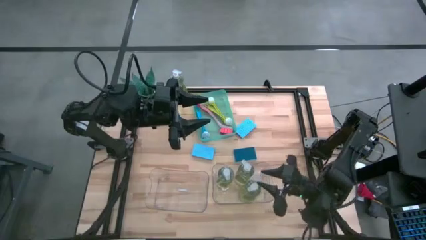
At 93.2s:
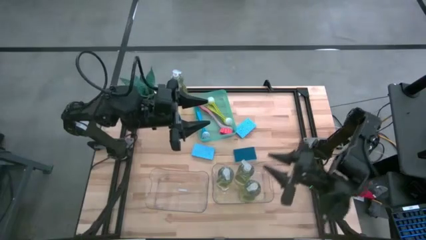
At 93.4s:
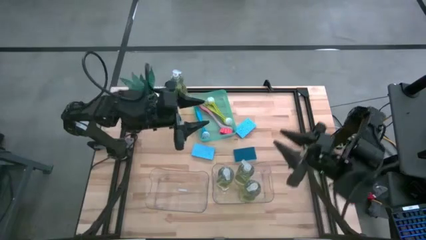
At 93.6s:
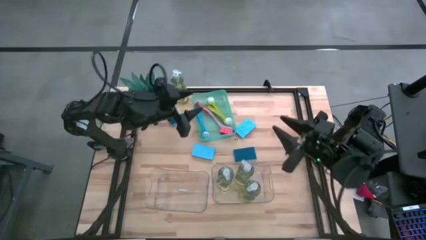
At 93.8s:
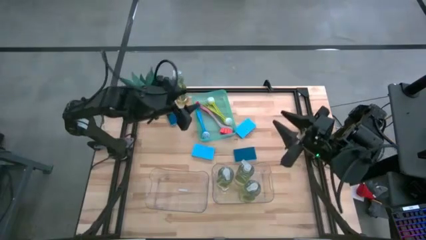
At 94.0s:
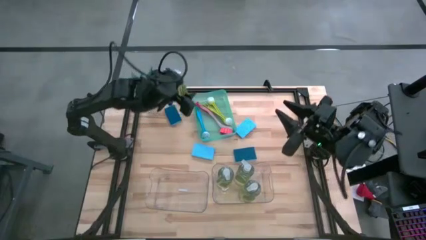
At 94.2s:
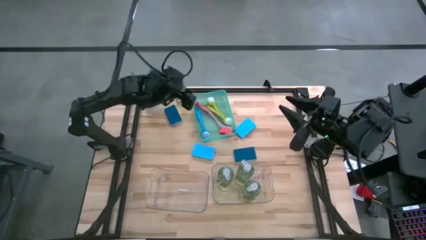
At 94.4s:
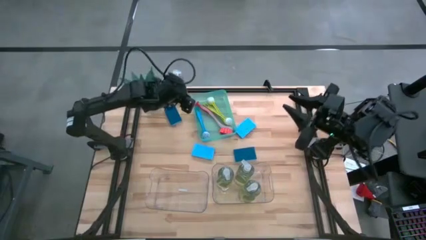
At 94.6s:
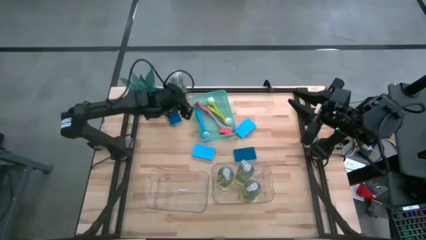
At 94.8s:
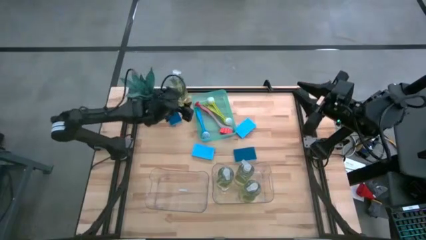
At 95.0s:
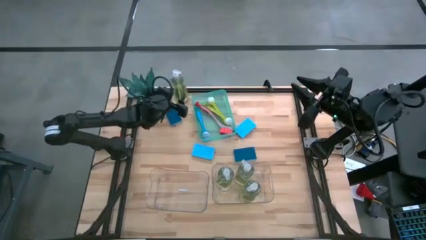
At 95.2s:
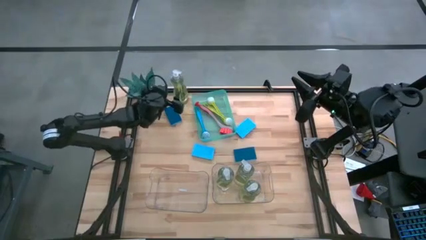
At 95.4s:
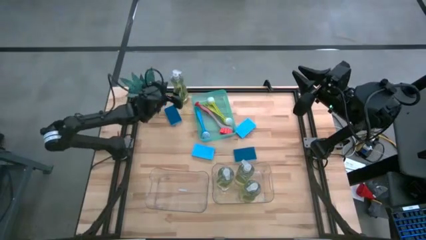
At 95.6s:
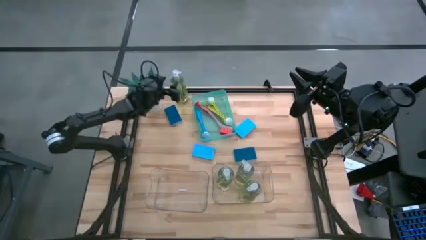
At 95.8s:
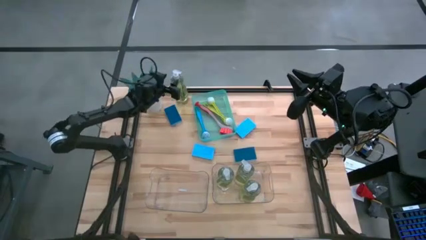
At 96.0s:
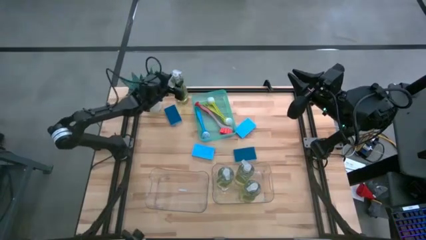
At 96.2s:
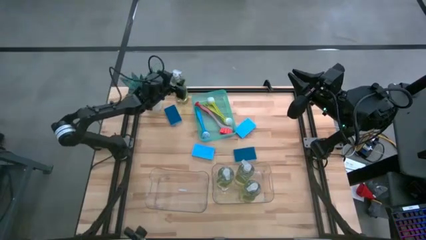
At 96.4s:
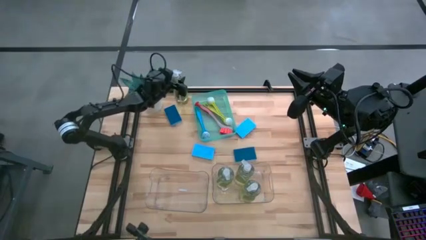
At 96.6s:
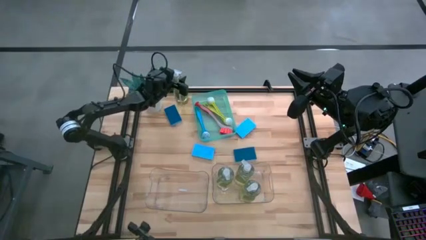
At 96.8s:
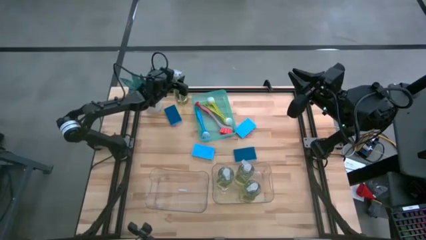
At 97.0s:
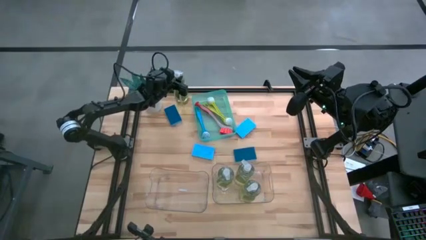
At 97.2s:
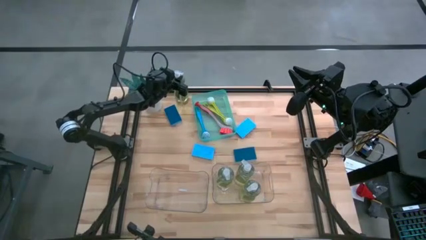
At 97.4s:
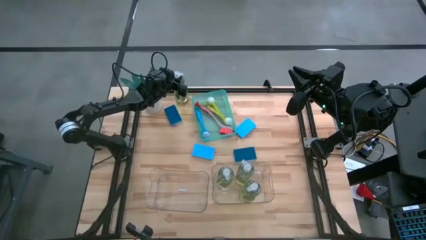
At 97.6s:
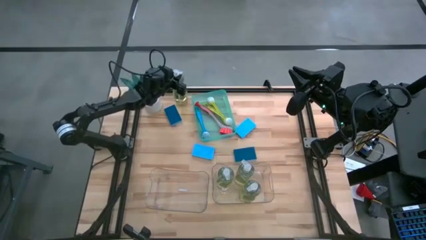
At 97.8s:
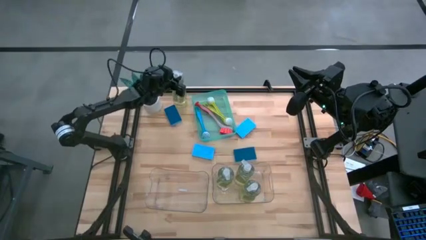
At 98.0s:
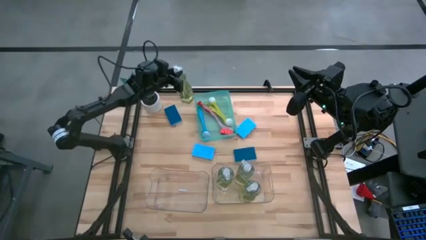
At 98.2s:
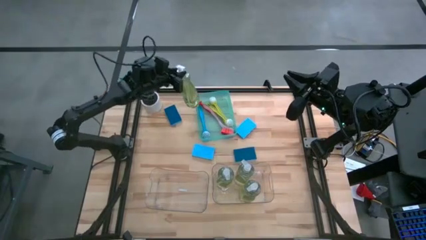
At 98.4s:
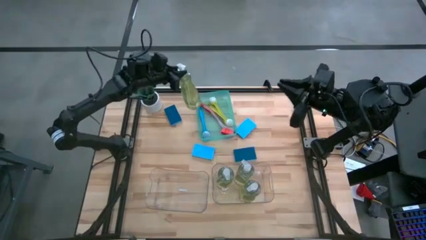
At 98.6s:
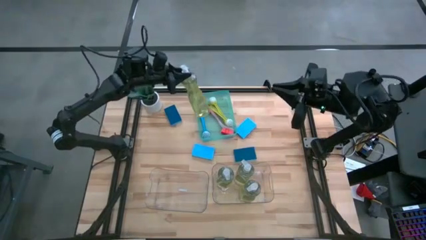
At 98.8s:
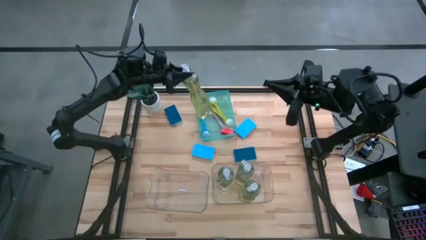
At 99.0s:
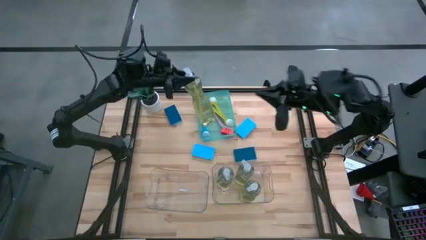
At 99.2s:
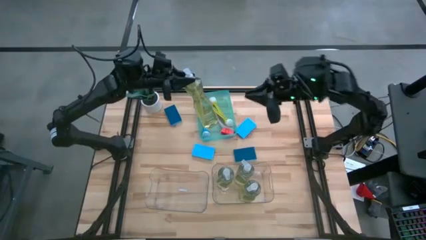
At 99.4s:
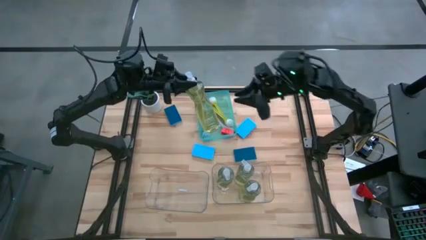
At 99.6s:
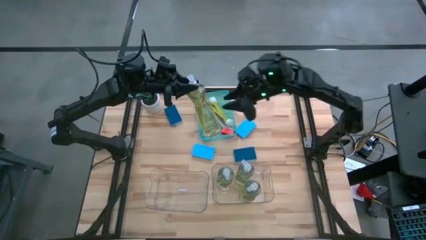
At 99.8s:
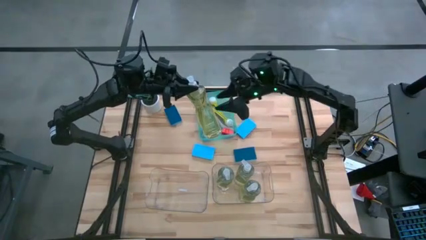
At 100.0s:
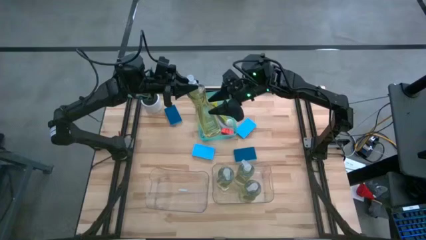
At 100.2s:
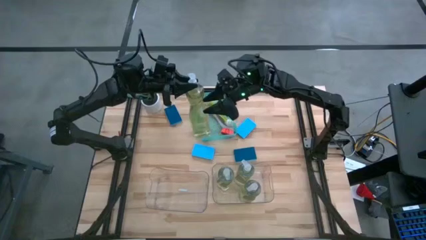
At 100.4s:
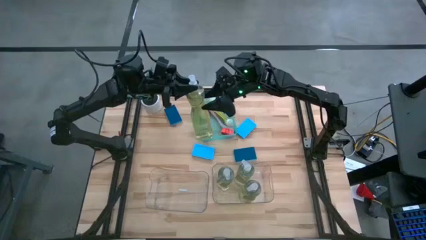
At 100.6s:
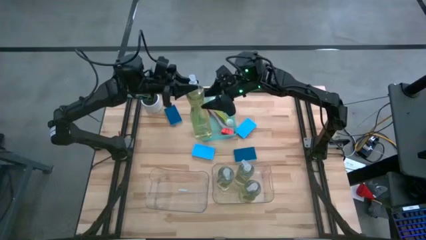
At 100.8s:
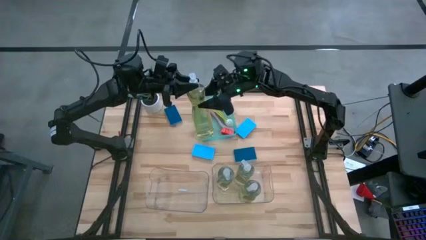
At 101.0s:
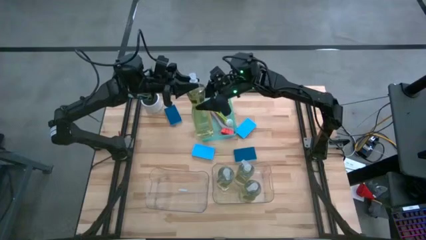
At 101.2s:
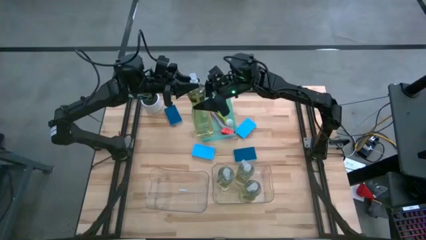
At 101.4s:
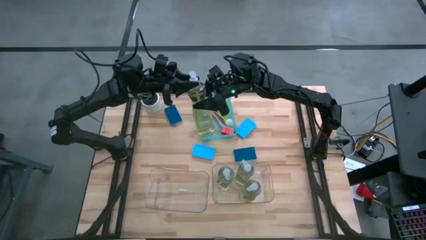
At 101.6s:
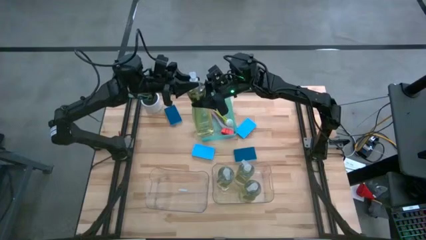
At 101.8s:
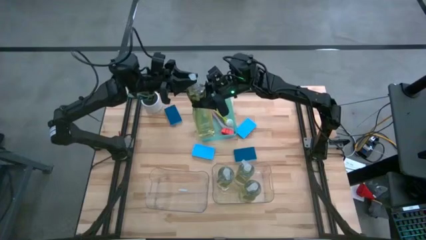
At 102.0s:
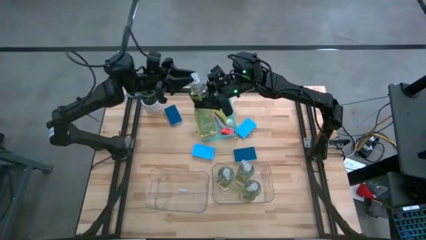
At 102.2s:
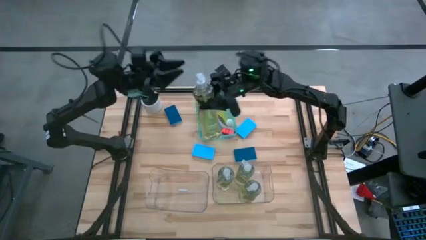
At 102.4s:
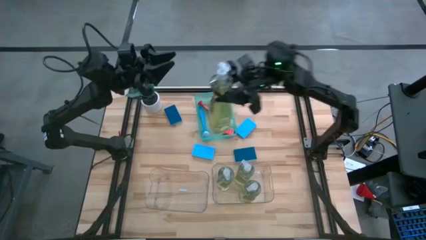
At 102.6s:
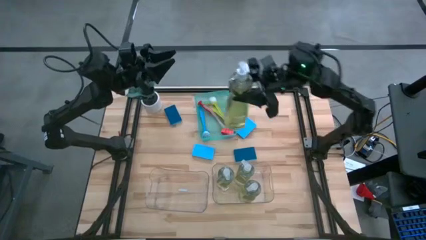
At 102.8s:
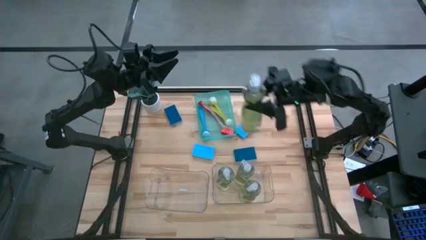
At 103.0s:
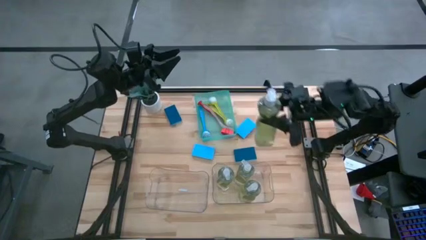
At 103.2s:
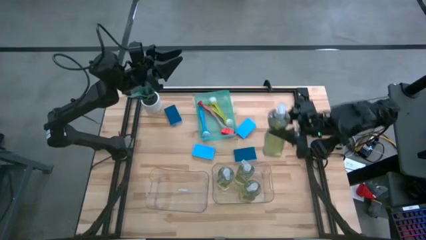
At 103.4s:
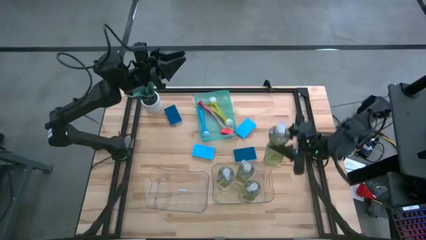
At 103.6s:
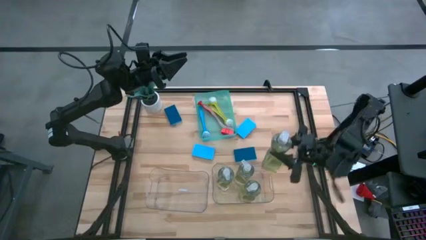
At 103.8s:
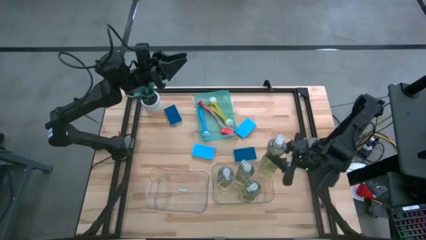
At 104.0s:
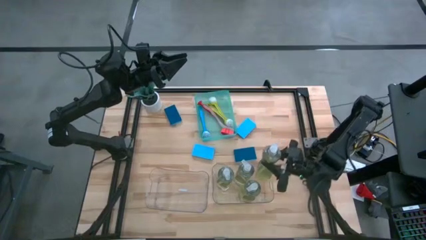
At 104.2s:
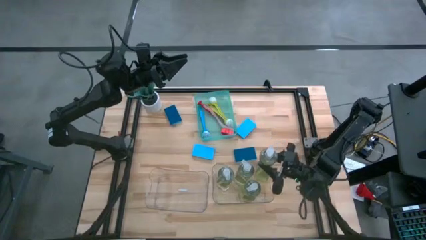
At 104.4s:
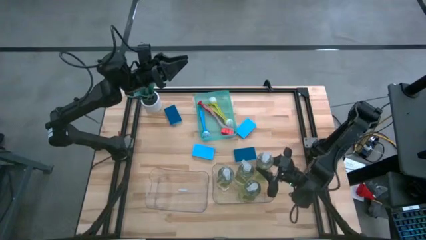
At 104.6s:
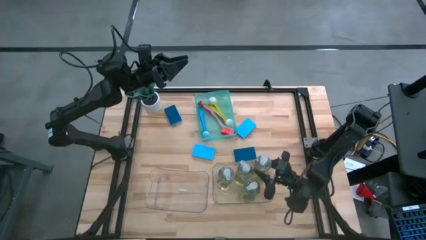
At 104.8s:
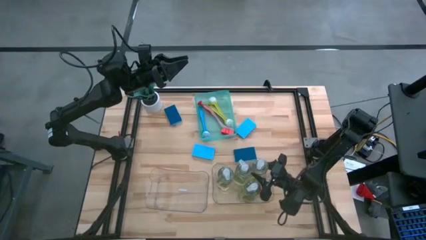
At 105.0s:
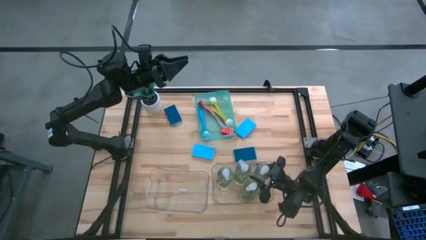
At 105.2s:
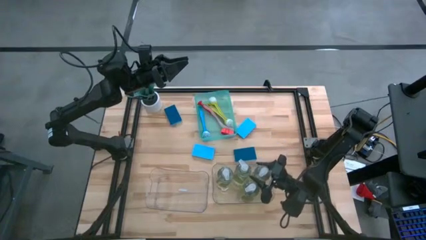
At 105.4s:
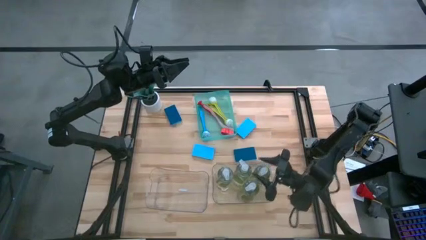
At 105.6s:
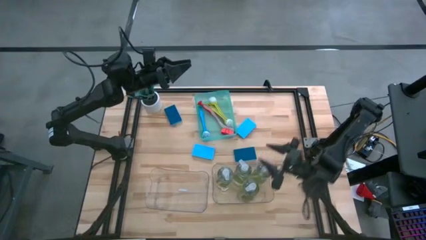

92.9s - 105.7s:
Task: Pick & Place Kitchen Sink Supplies
Put the soap dispenser into the right transparent bin

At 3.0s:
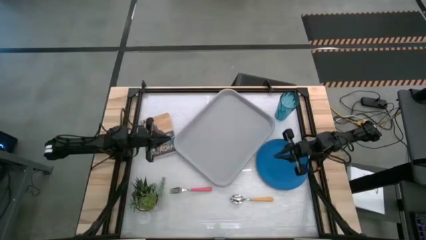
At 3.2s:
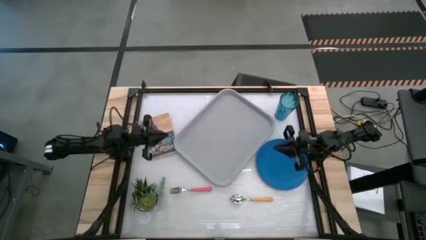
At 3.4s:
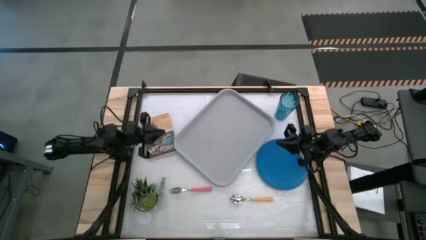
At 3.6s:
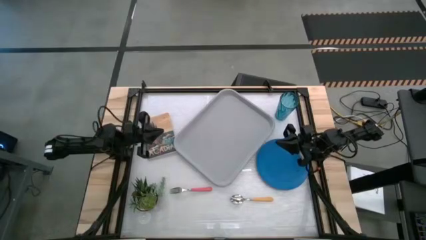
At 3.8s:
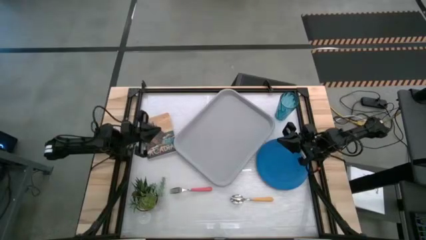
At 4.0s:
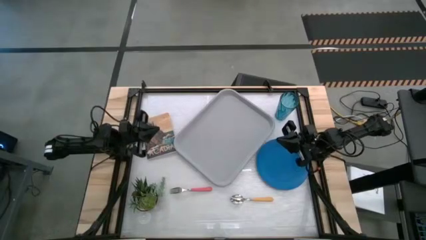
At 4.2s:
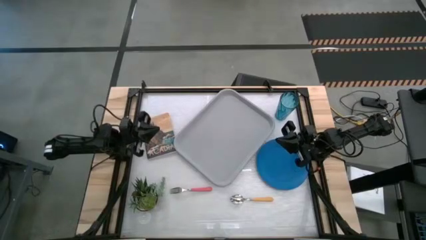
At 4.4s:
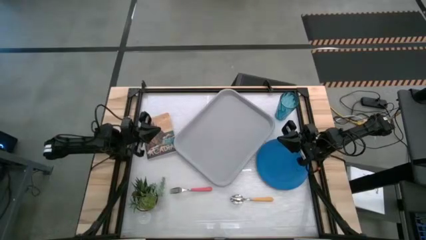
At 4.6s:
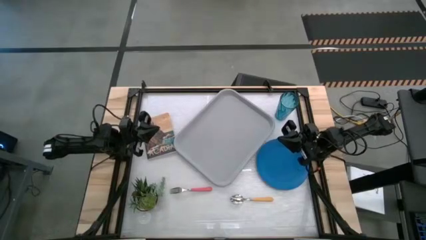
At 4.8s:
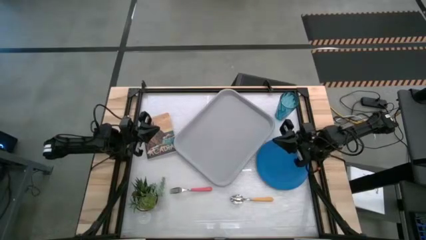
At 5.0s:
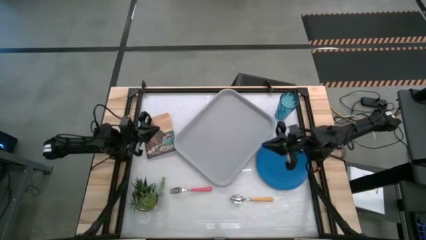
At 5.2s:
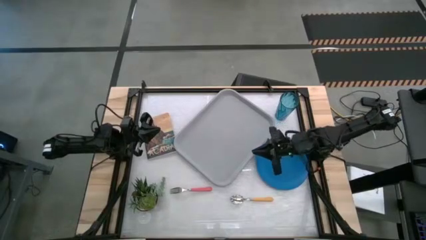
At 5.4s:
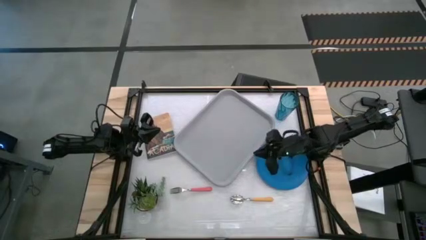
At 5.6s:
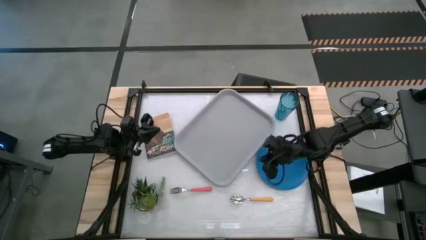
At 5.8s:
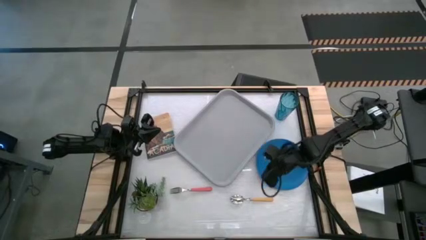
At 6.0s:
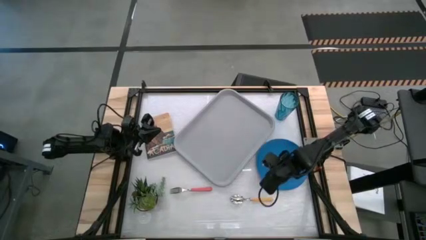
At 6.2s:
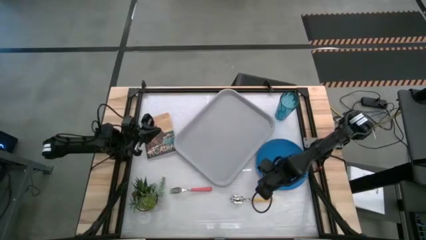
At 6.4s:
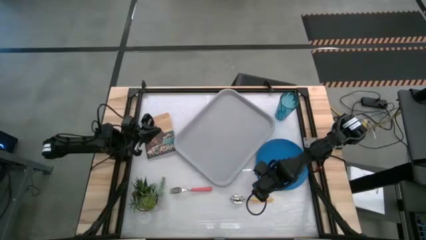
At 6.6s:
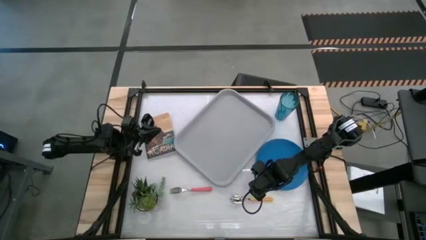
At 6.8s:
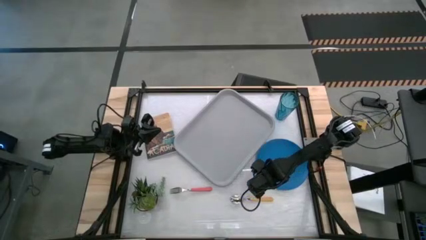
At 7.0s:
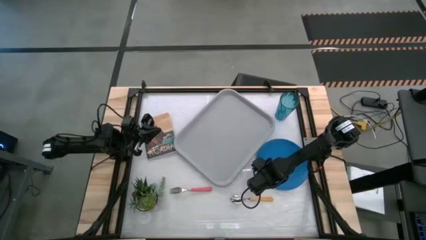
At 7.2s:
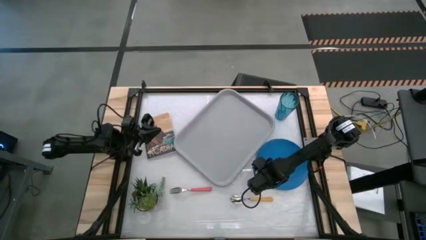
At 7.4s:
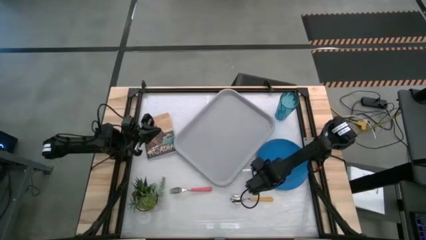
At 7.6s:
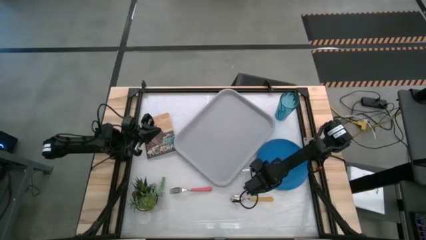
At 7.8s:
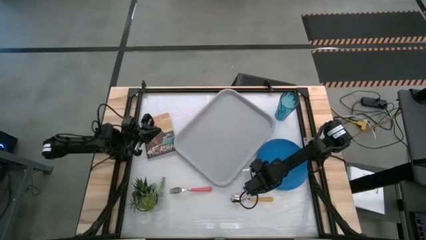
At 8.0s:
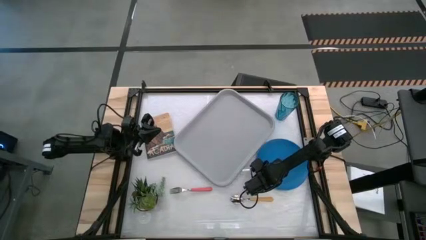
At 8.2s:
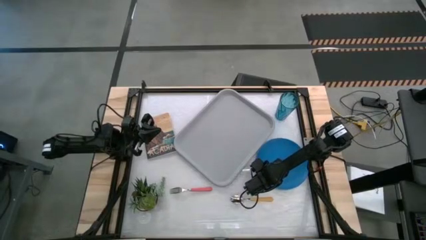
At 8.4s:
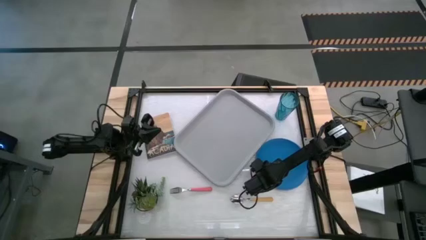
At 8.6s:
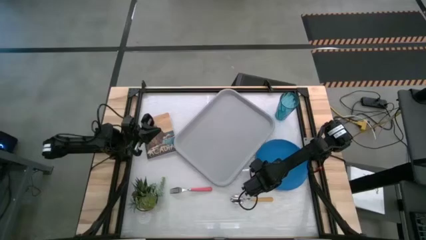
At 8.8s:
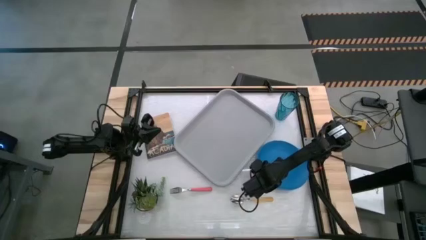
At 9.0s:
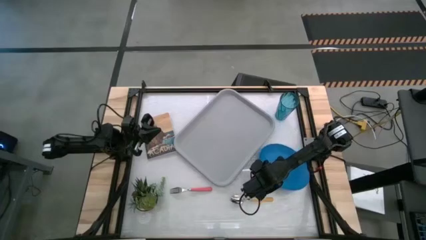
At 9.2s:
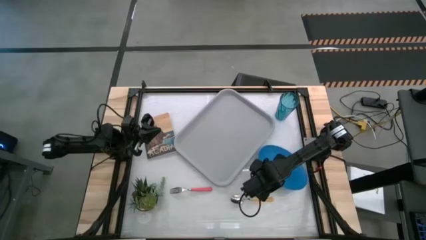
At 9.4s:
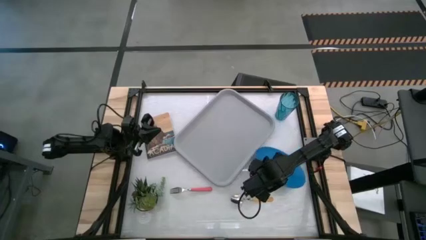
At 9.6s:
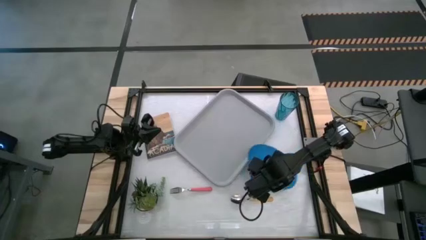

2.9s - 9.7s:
Task: Pick and place plate/cup/fork/spoon on tray
Put the blue plate on the gray serving tray
